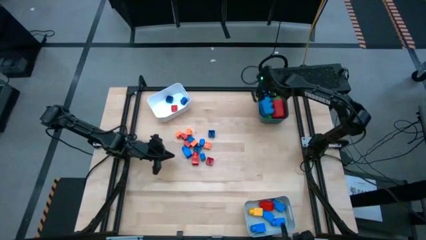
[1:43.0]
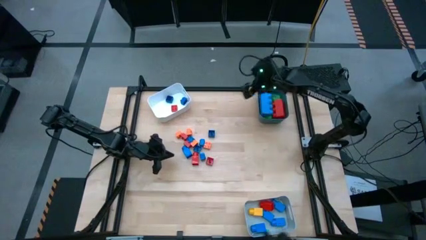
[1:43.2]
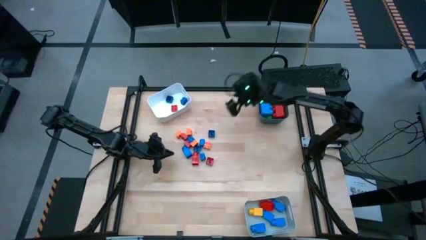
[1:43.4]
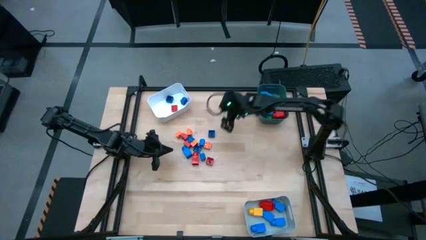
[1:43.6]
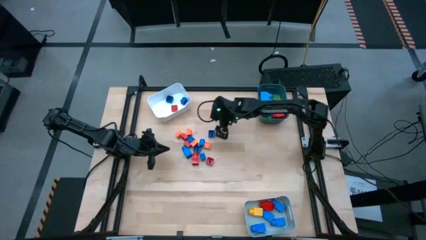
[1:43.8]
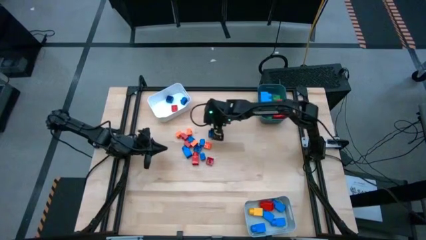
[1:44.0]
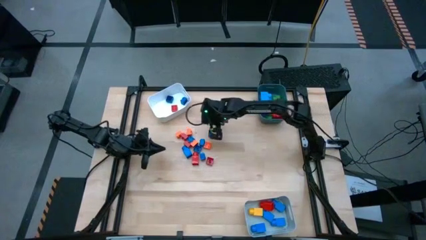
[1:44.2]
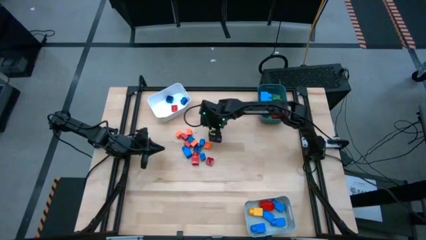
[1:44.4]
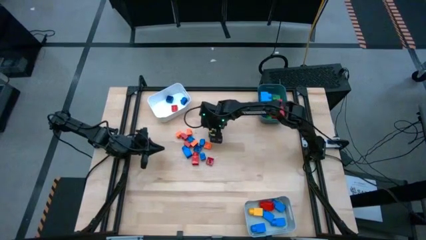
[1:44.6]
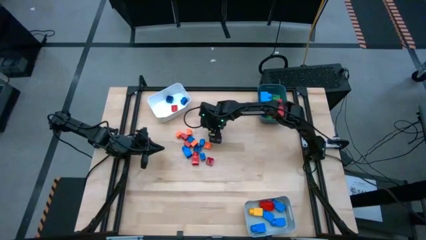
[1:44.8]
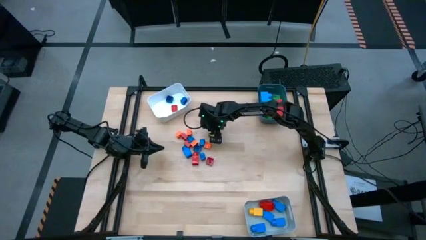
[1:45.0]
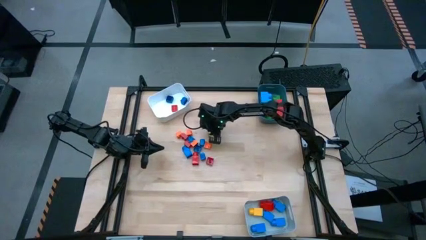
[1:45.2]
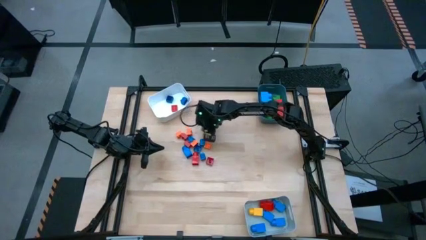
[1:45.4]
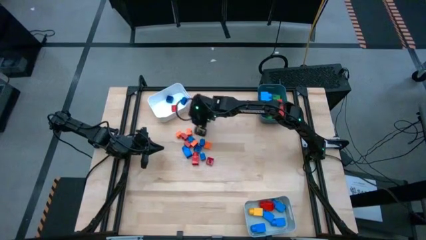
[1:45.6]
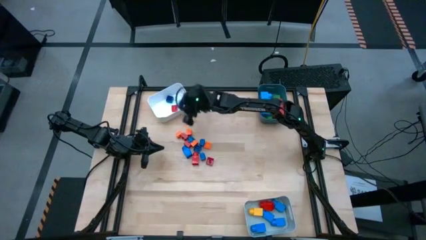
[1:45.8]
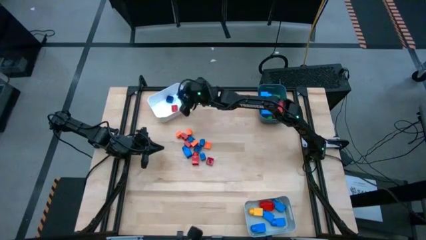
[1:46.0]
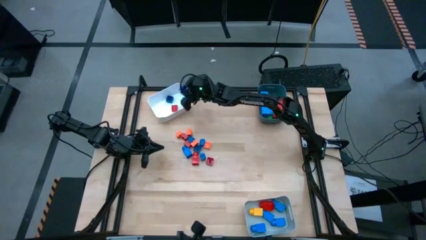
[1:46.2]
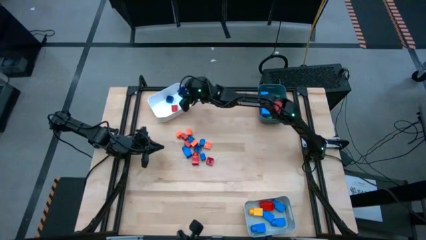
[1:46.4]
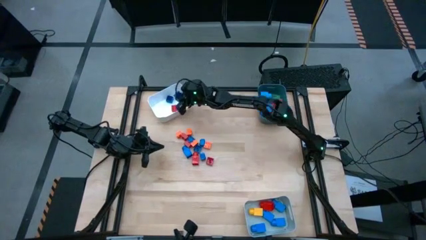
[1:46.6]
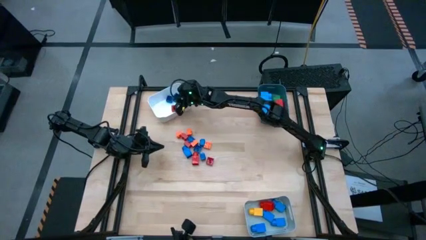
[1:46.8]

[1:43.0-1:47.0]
Task: Sort blocks by size
Put the small 4 stud blue game piece into the white bin

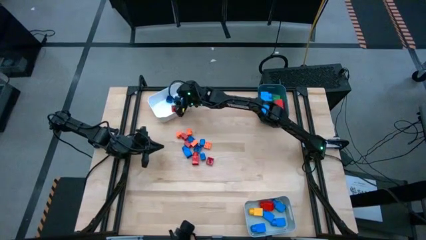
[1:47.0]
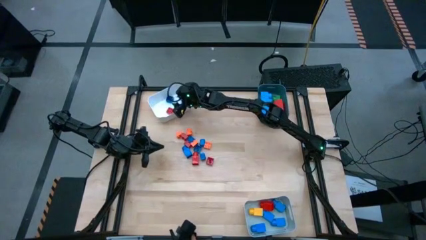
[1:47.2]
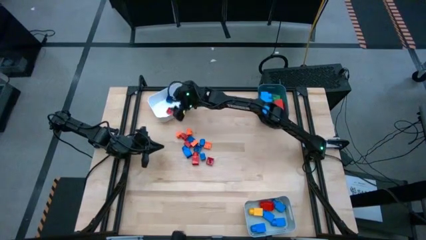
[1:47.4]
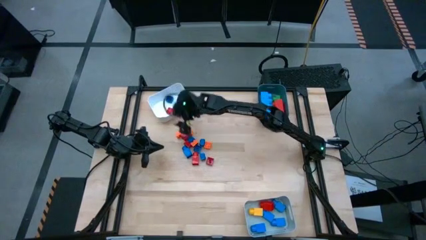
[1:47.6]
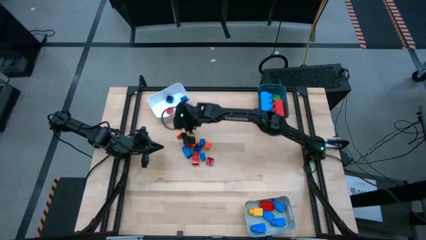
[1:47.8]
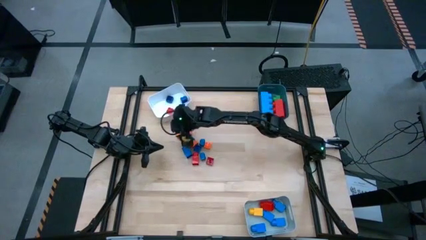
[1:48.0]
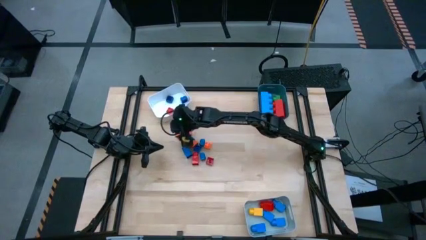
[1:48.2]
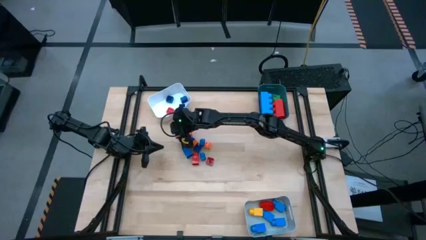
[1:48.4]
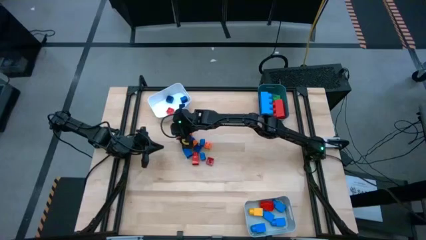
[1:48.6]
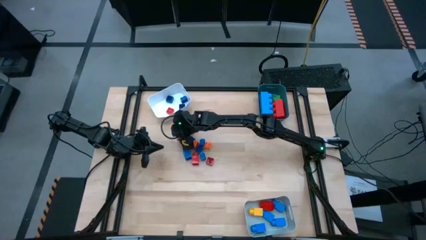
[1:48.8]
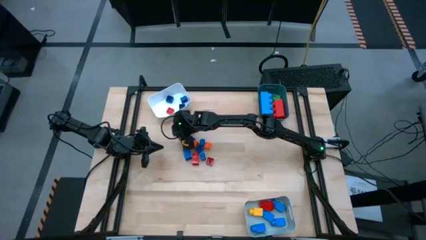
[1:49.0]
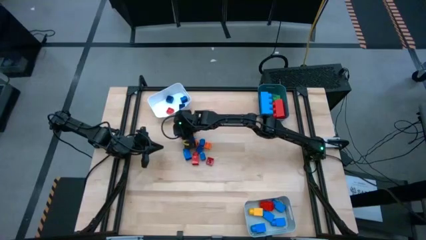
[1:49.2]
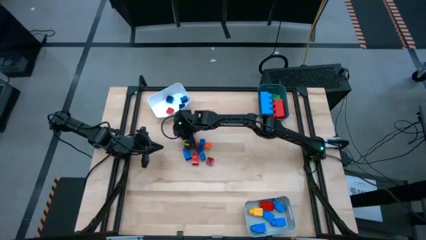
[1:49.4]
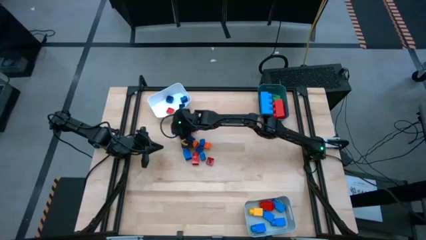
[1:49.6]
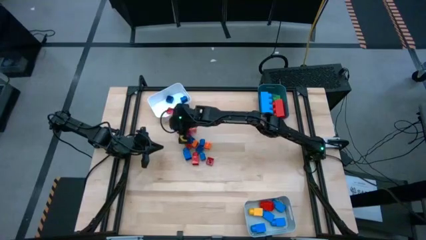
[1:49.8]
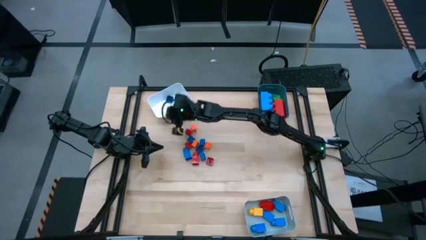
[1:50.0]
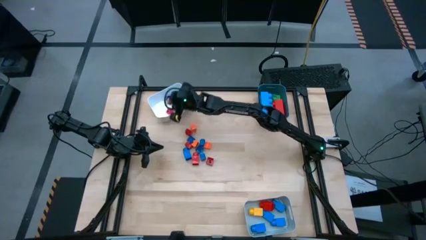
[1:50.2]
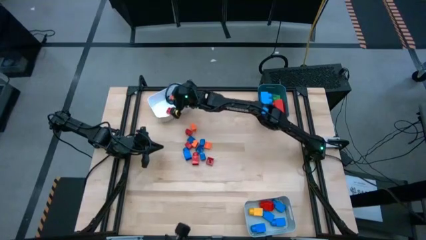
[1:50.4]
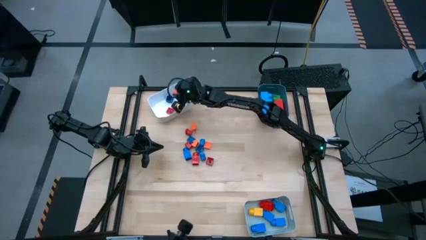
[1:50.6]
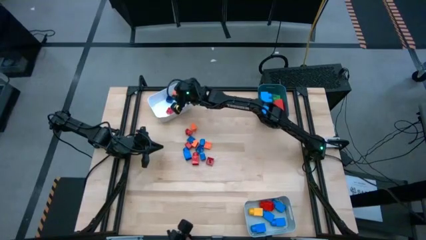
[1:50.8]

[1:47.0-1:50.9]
Put the 4 stud orange game piece into the white bin

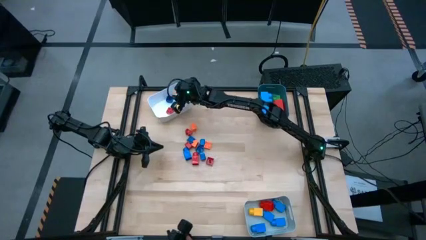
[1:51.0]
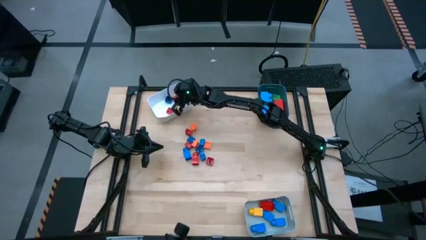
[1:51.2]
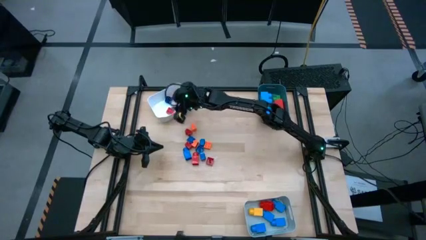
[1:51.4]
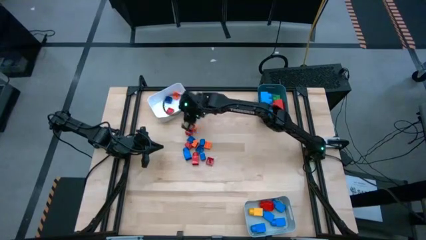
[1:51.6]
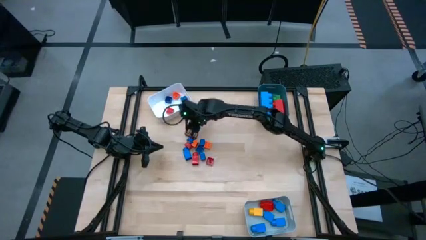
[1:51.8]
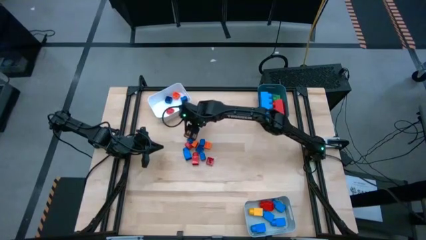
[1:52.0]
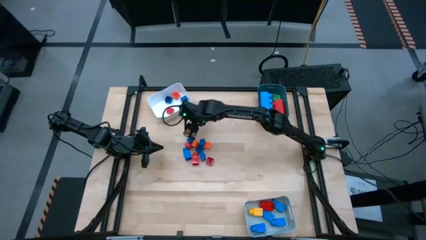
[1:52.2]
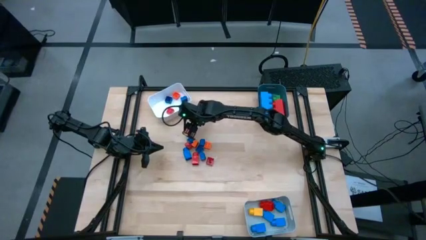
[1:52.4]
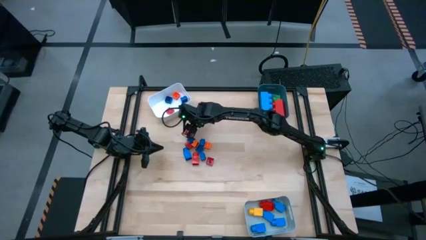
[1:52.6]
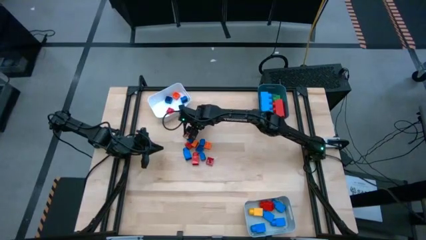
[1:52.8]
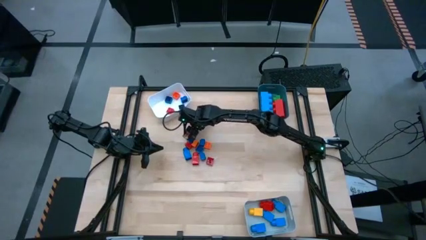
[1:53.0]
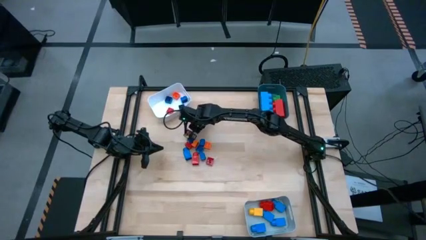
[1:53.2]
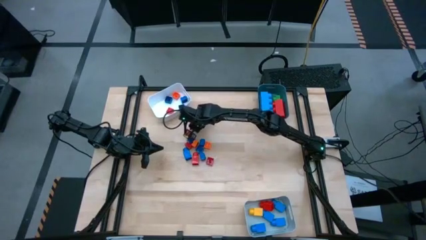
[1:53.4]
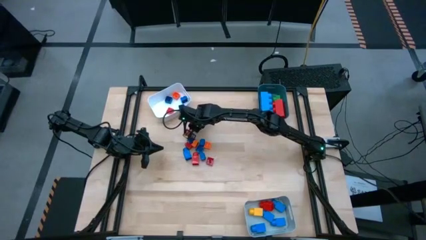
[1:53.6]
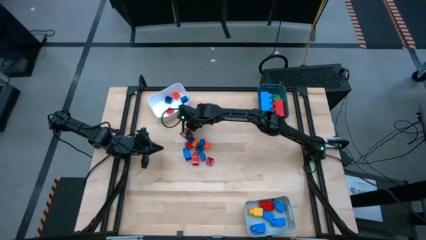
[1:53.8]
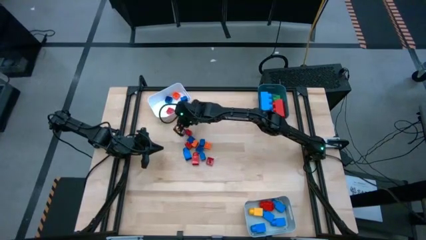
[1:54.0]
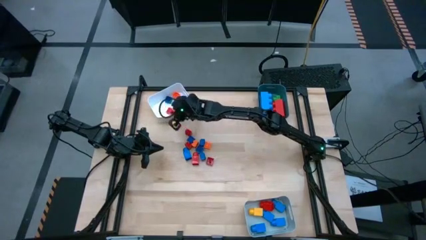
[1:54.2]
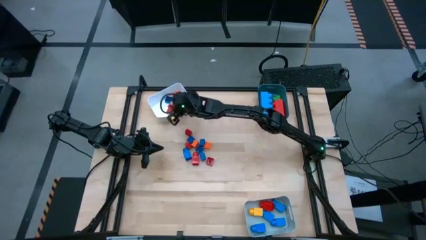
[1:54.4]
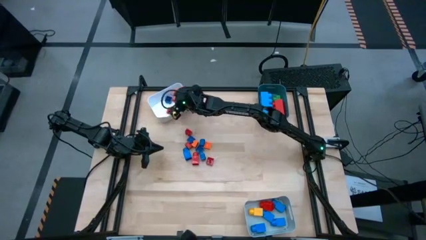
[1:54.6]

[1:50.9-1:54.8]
Put the small 4 stud orange game piece into the white bin

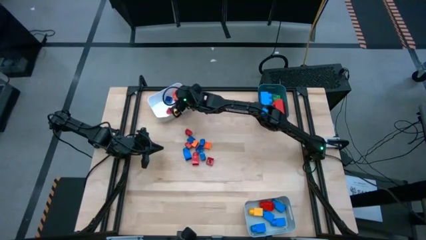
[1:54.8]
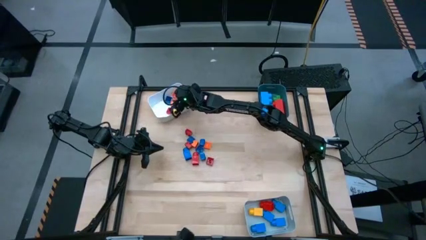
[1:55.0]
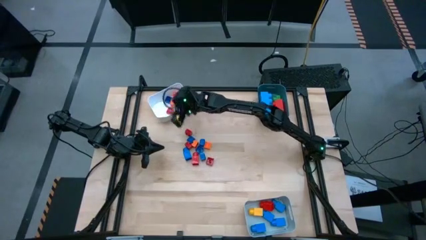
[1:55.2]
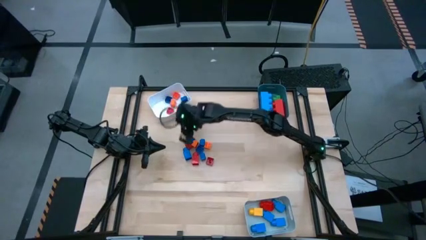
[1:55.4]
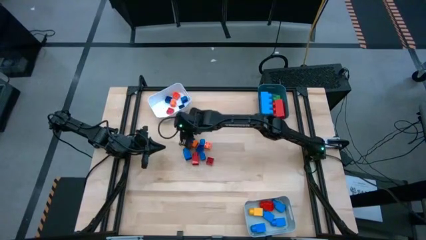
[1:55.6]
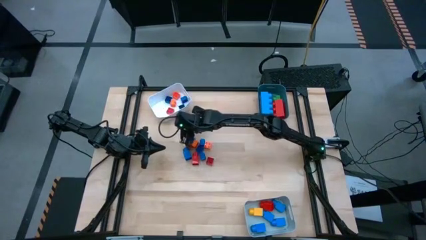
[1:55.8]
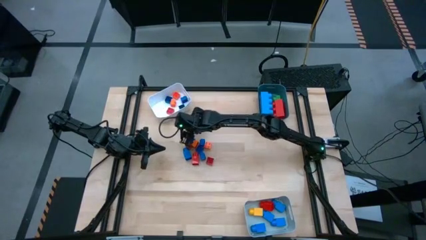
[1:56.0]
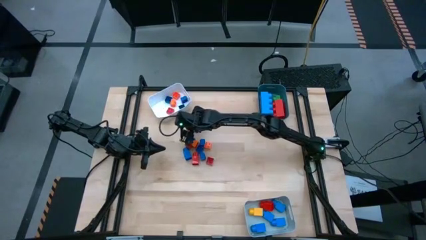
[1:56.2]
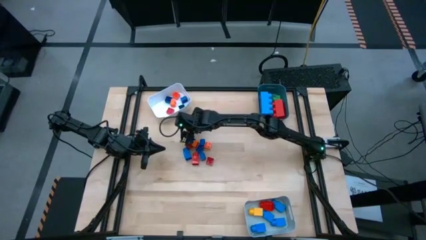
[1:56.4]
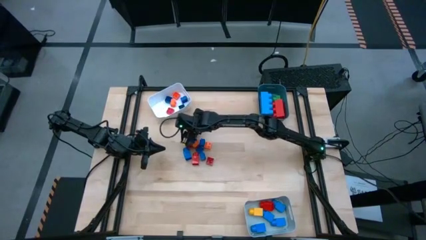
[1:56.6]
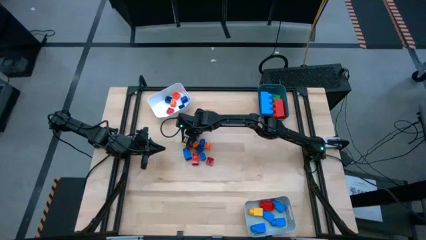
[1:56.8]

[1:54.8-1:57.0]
Put the small 4 stud red game piece into the white bin

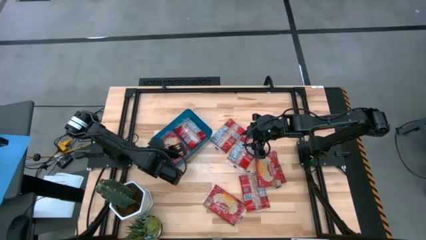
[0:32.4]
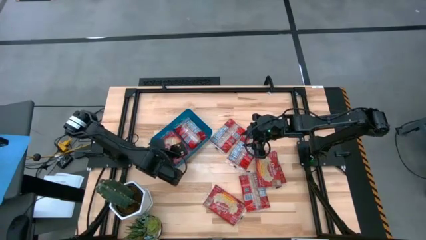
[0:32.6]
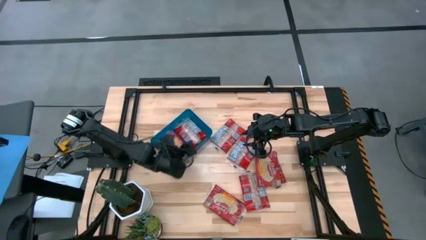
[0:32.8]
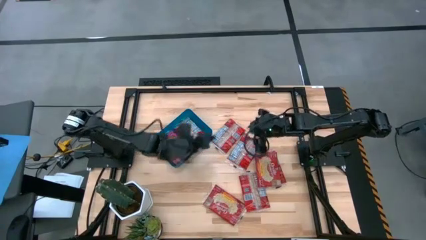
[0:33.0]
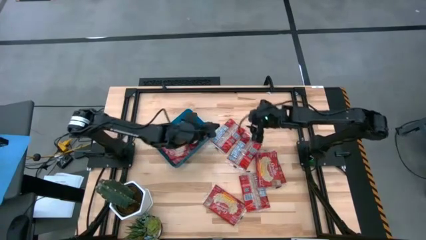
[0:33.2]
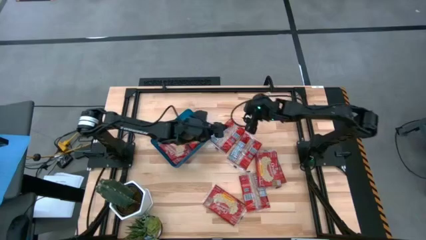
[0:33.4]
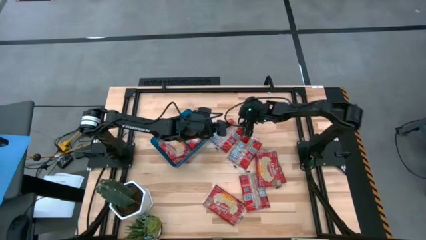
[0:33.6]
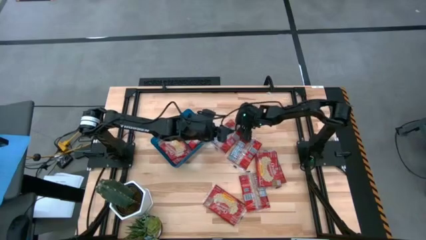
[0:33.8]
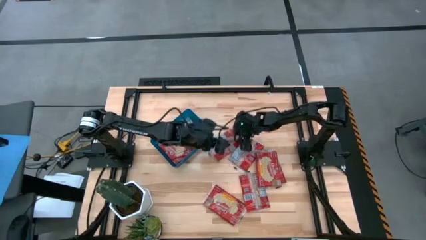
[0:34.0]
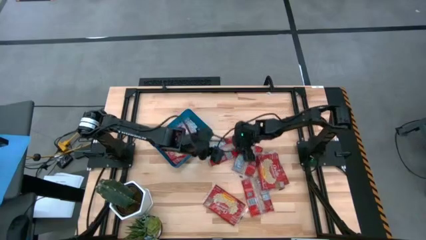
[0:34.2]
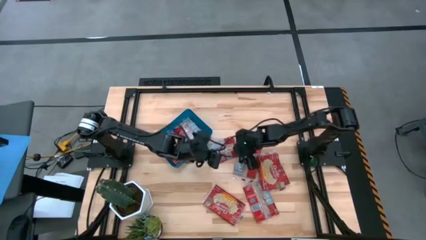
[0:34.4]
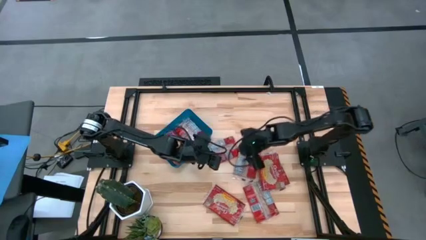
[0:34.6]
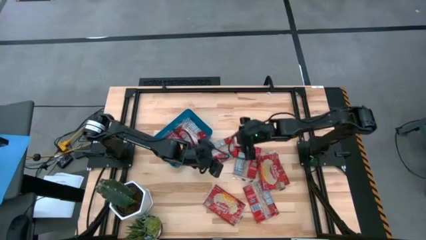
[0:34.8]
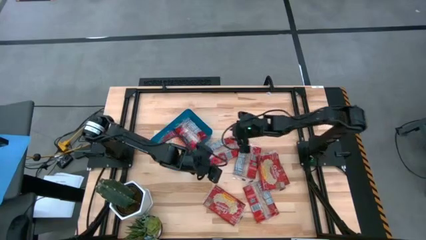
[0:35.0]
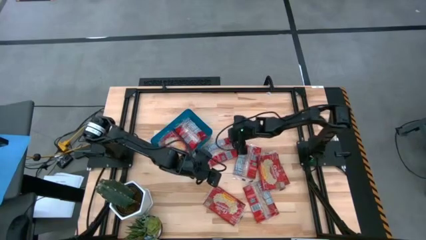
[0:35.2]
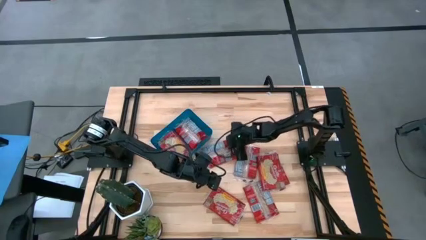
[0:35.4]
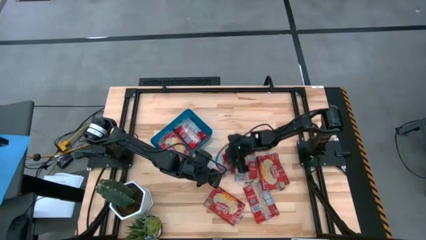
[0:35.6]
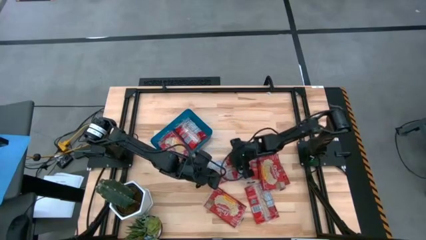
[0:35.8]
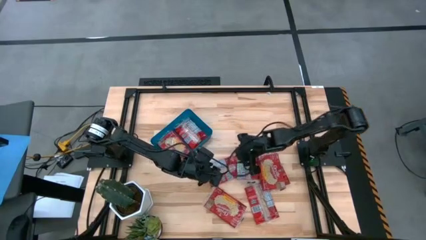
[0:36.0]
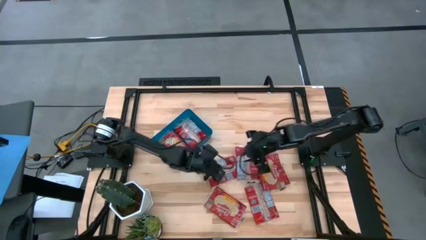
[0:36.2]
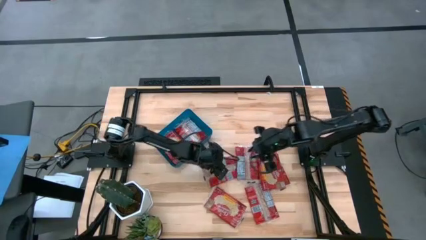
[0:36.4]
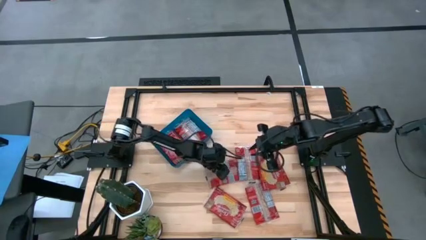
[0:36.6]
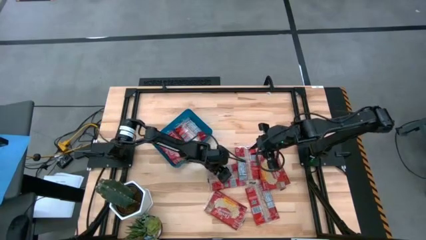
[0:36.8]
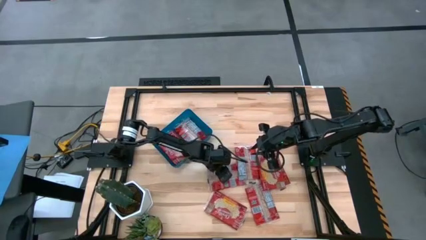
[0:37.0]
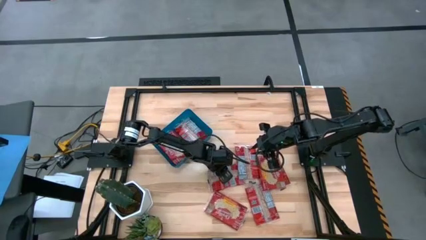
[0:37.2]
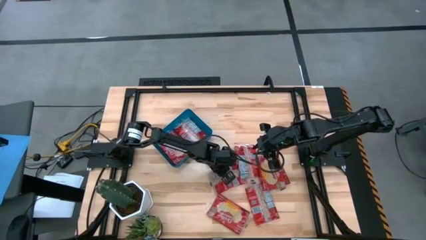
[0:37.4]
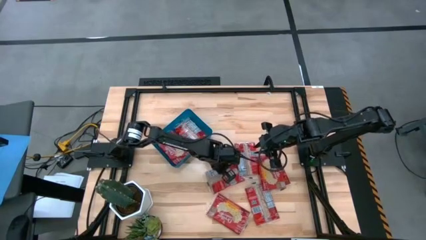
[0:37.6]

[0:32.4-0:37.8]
Task: Sort popcorn bags into baskets
Put the red popcorn bag into the blue bin
